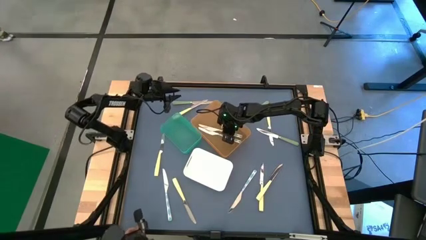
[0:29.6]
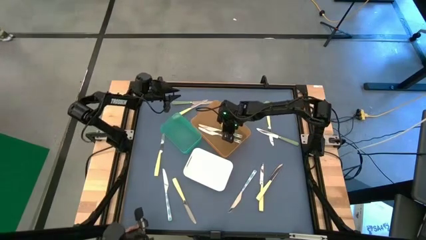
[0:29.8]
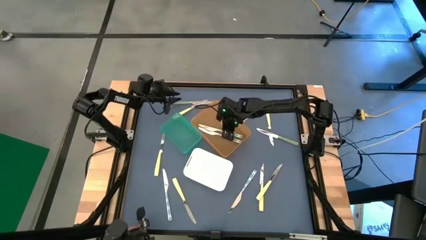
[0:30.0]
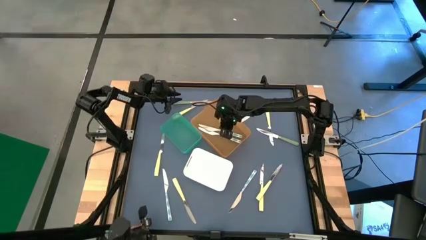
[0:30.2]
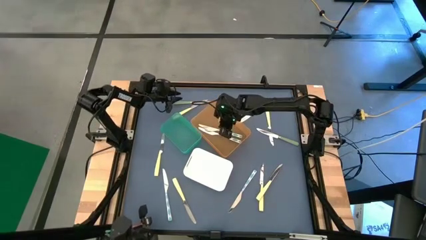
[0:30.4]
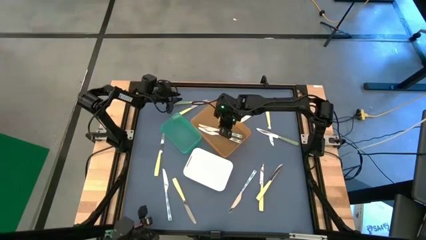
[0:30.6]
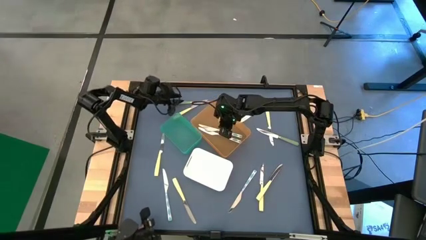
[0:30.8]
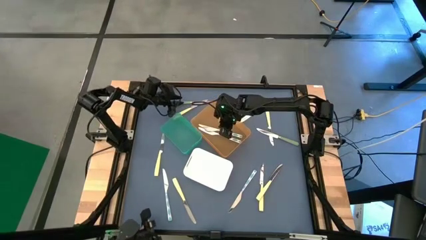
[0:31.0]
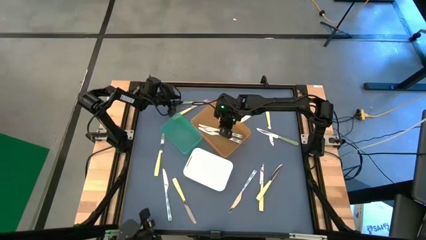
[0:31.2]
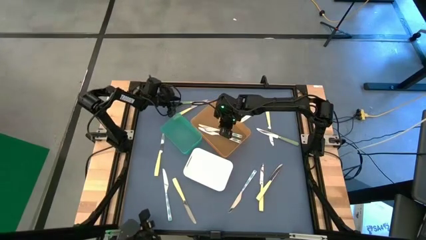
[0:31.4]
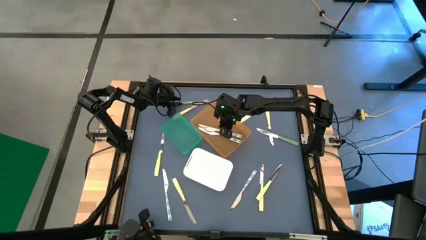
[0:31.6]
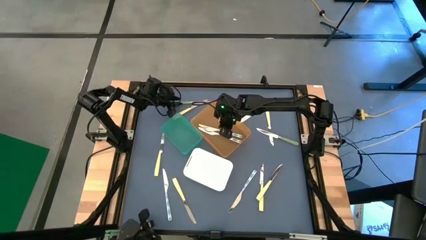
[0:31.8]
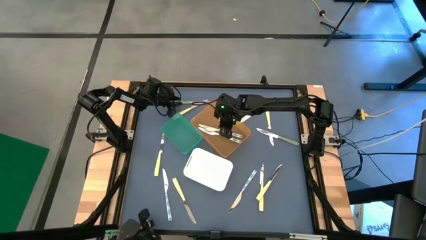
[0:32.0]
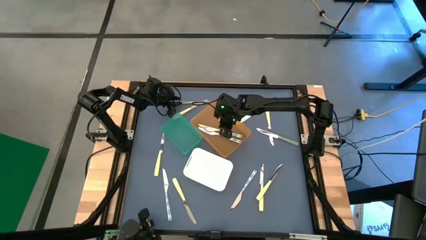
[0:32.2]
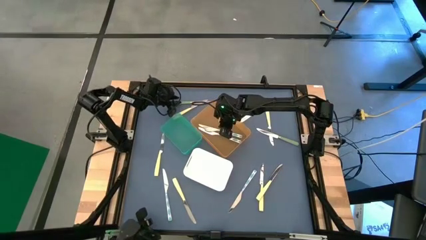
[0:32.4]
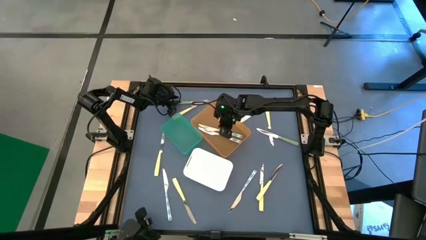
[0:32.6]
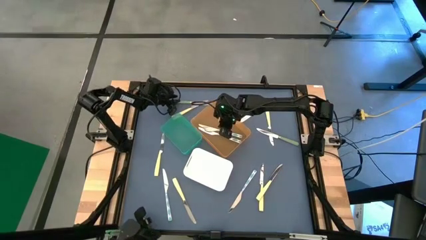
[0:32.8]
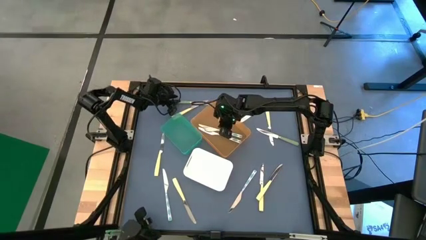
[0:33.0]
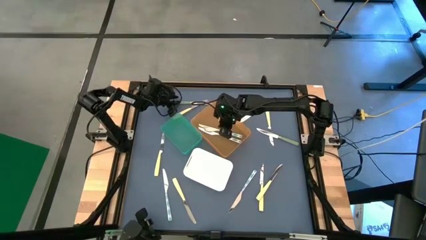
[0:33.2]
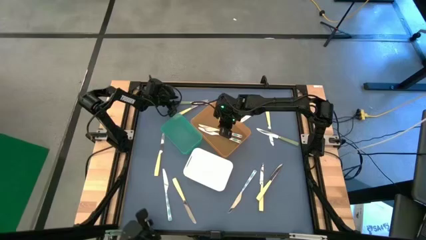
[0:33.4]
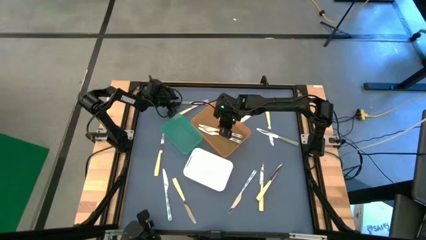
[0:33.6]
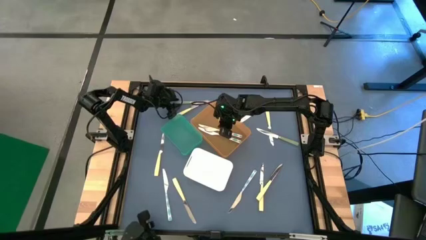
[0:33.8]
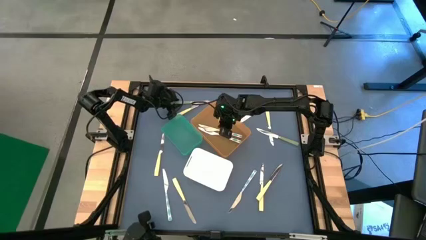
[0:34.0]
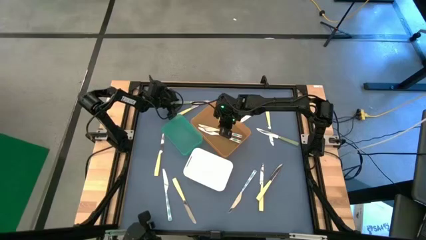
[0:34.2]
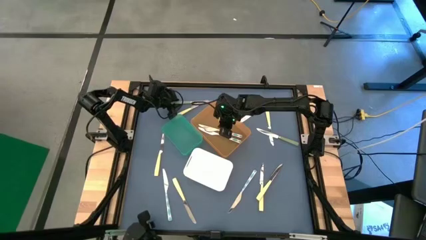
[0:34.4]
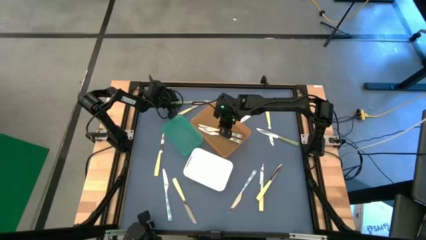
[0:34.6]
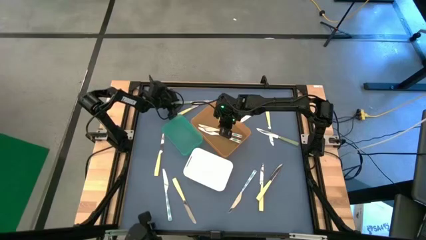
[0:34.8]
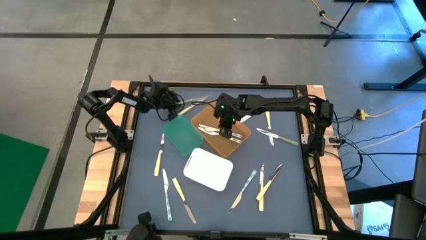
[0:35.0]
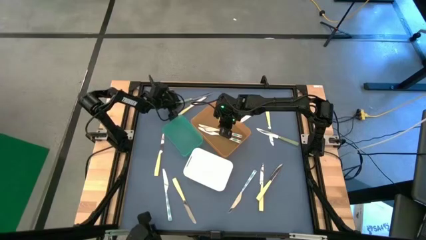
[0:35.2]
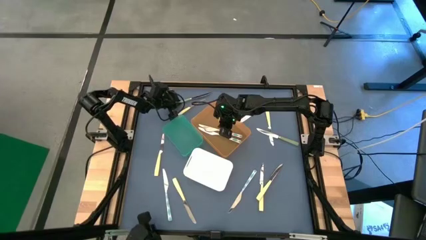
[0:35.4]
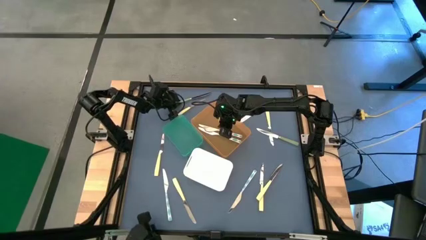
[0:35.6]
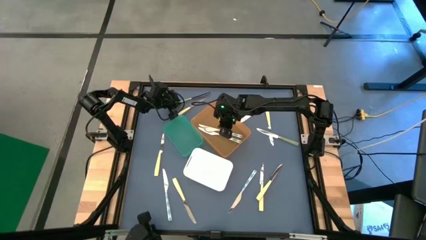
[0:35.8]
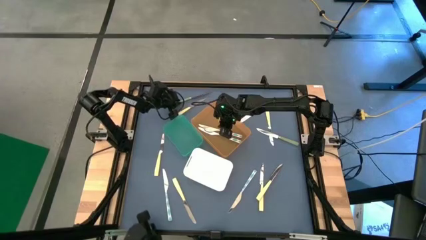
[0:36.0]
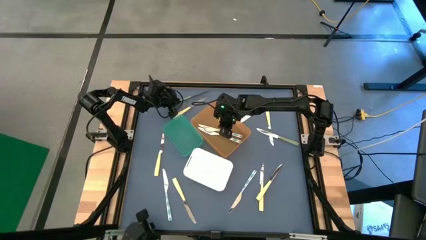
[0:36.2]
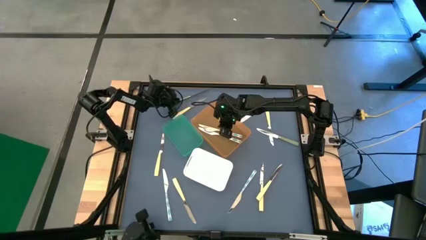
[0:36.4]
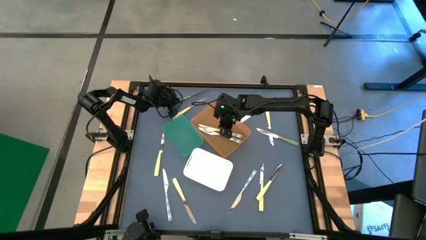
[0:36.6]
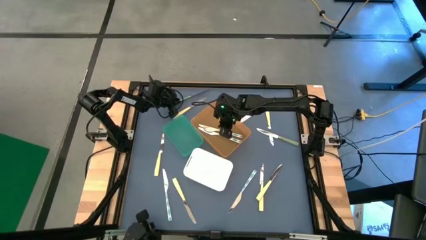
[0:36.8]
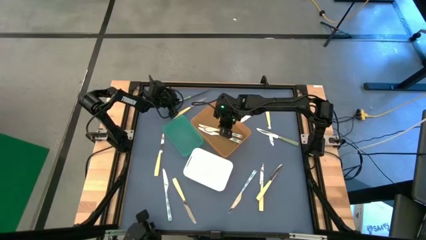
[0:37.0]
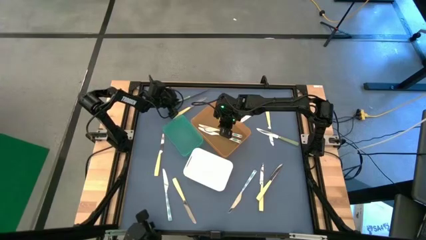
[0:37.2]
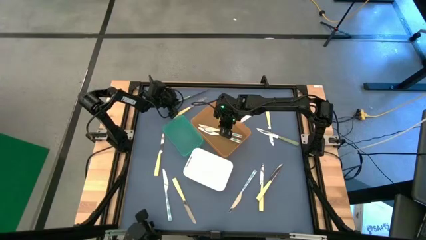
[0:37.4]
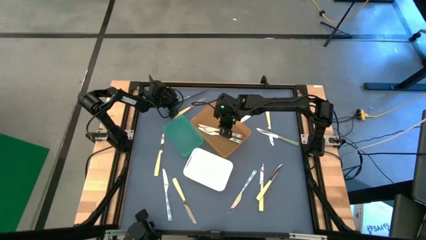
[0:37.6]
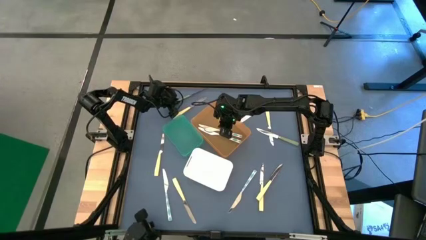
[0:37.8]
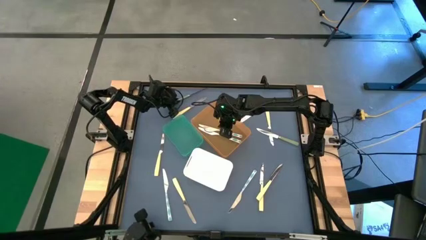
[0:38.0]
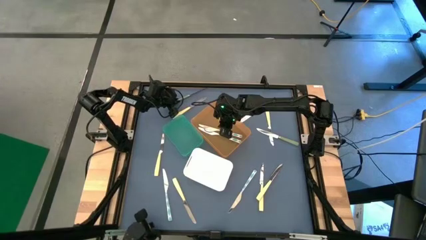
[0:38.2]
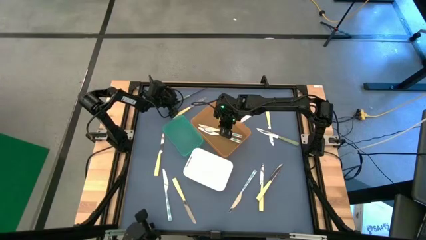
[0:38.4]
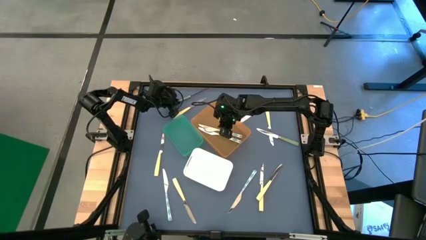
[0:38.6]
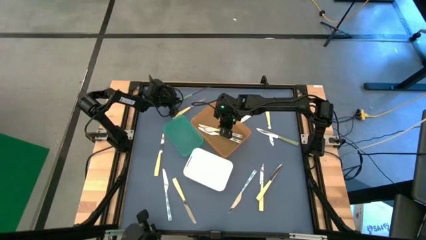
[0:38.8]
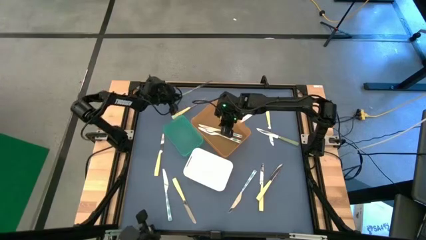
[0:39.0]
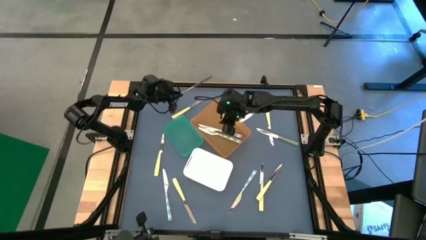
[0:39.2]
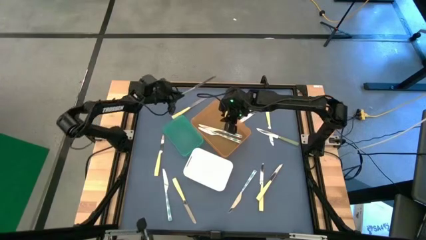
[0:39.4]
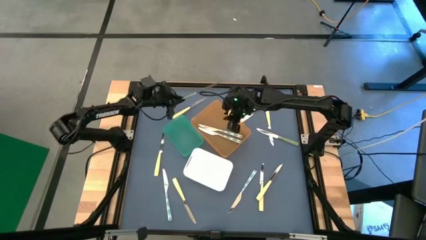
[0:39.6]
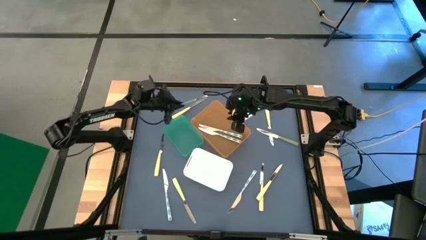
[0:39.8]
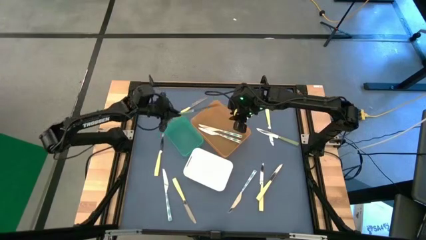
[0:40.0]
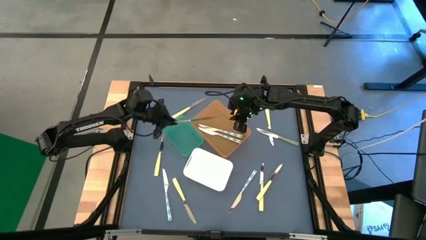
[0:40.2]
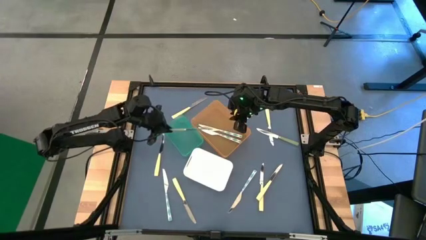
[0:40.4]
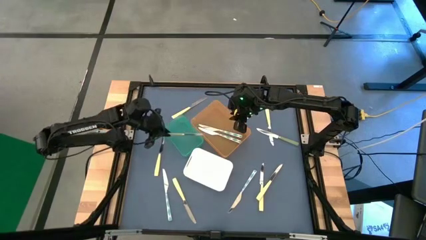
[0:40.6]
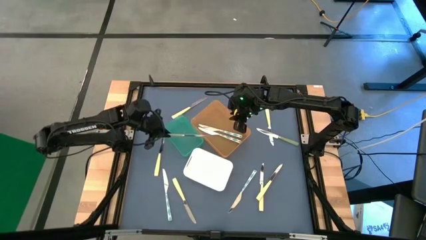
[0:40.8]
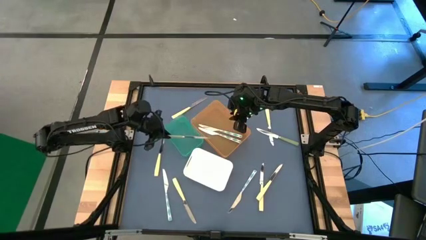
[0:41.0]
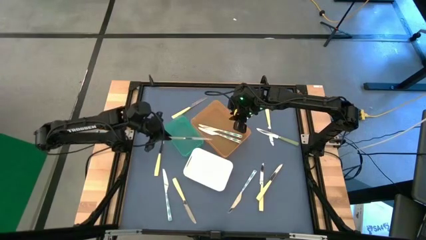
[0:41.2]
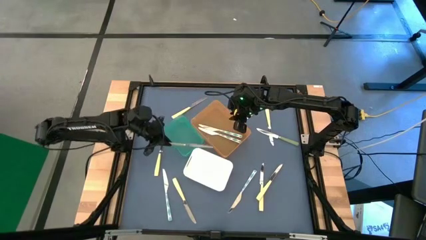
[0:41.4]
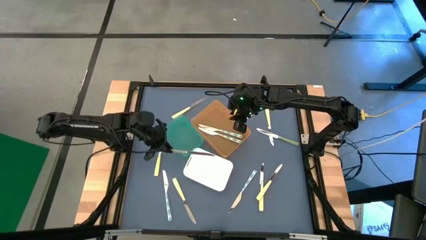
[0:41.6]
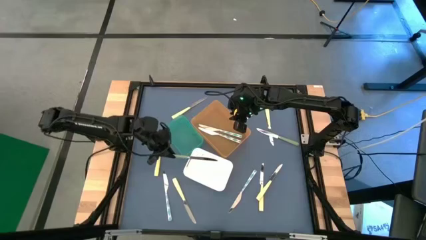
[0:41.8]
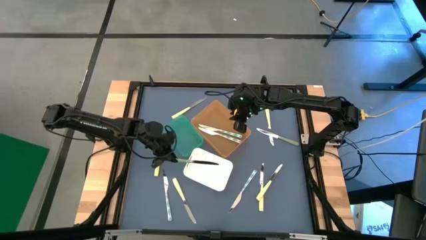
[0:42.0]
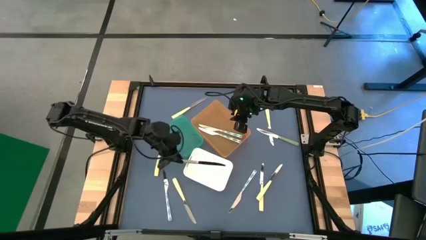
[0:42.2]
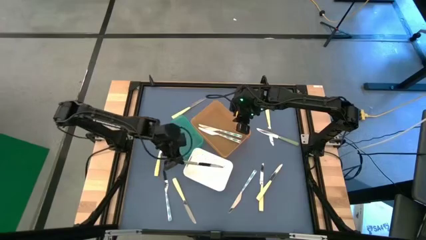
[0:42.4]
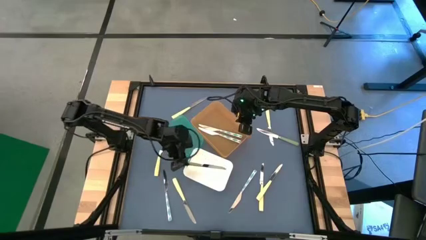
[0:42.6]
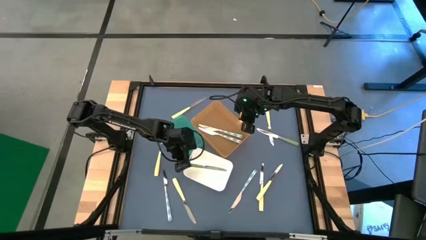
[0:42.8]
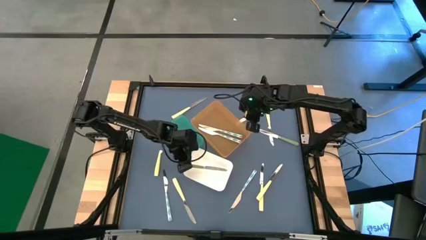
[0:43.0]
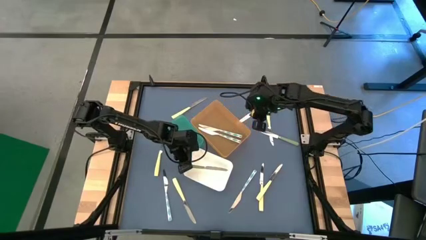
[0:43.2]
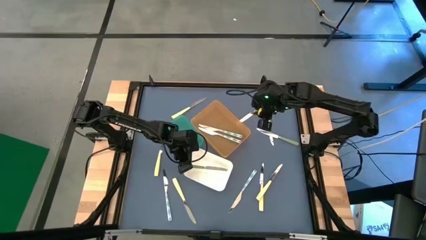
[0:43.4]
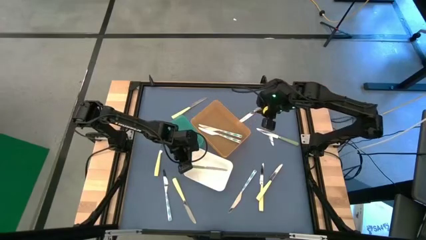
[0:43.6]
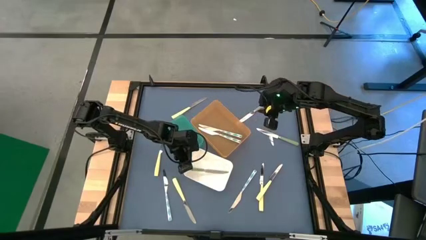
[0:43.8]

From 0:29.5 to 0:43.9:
Task: Sort silverware by color (type)
Put the green table knife into the white bin

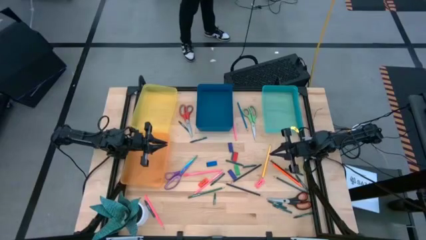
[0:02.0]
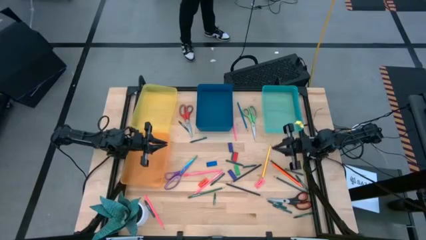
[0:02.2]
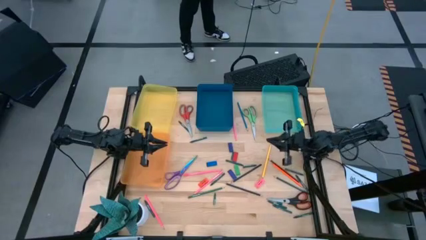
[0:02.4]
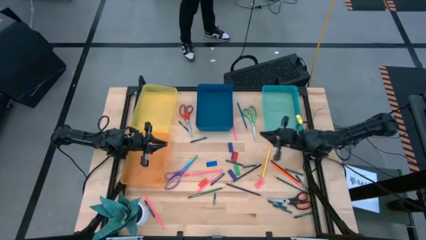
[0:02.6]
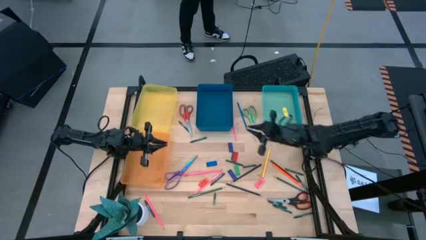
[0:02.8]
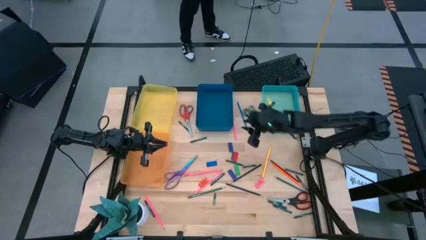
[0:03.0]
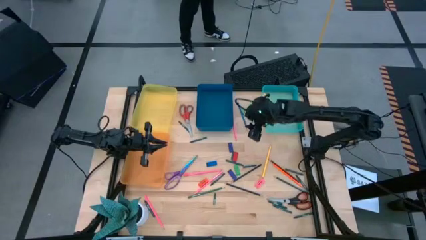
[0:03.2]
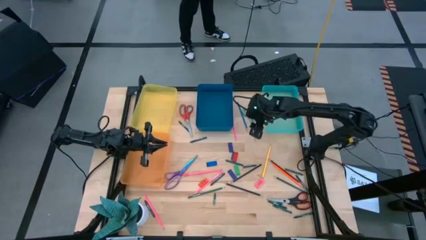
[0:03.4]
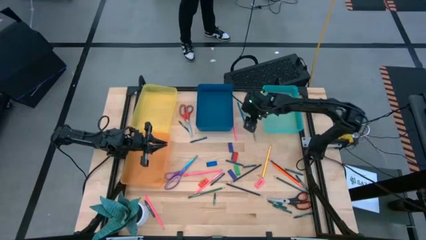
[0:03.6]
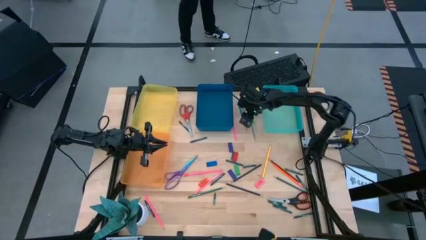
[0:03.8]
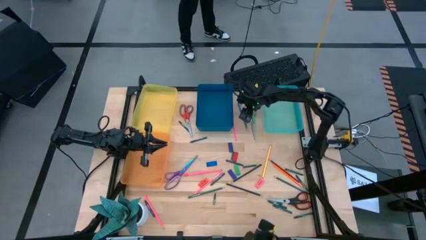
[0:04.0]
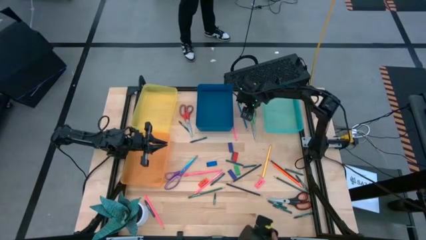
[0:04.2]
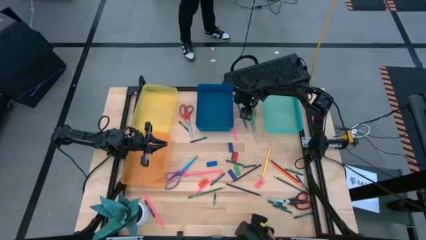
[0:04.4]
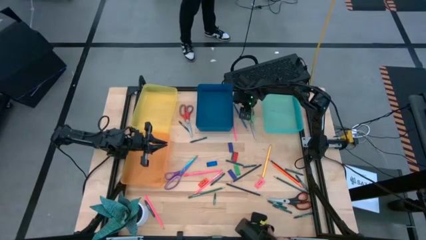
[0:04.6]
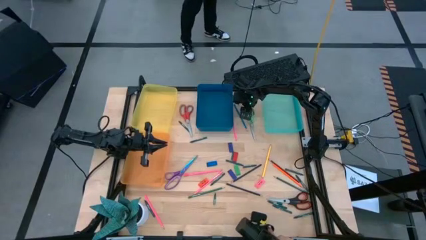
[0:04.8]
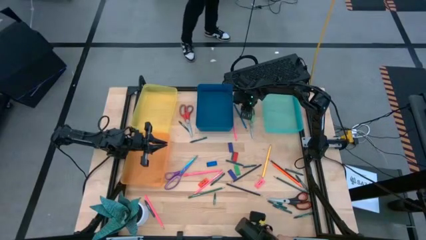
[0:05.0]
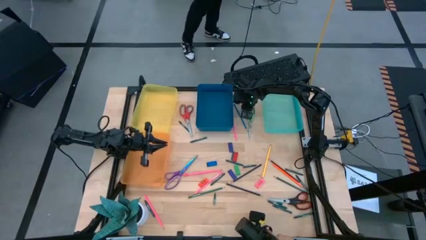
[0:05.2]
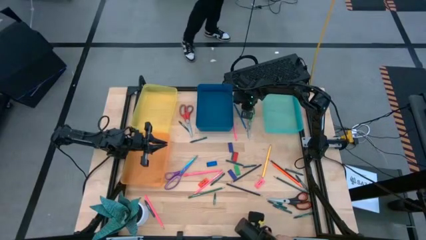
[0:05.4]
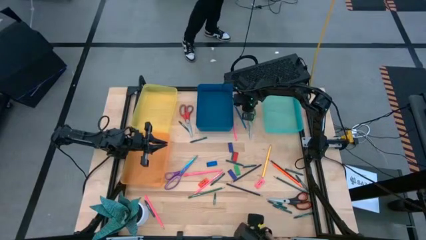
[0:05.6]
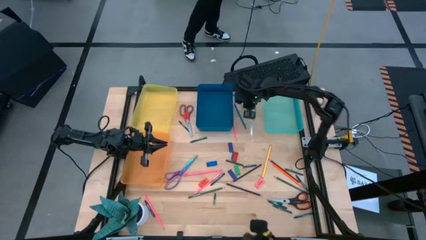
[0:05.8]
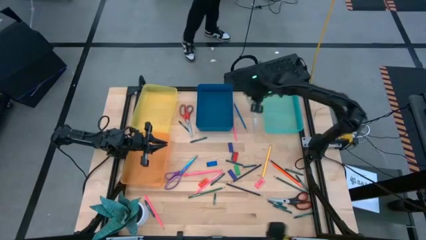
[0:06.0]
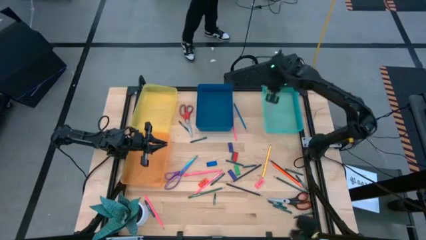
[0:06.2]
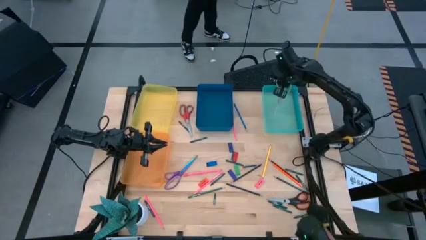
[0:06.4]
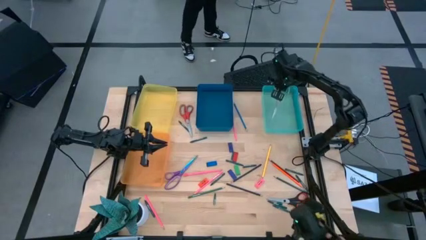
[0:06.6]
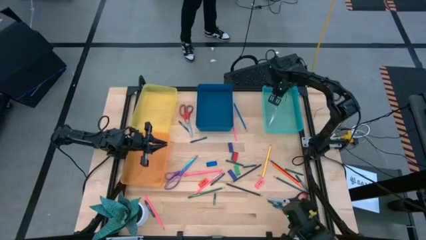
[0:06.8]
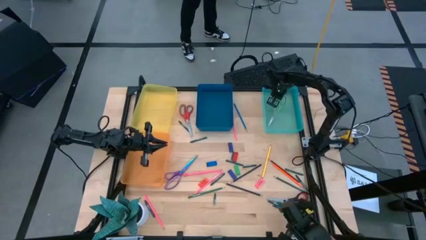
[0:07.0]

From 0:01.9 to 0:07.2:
Task: Sort crayons/erasers/pens/pencils in bins
Put the green scissors into the light blue bin
